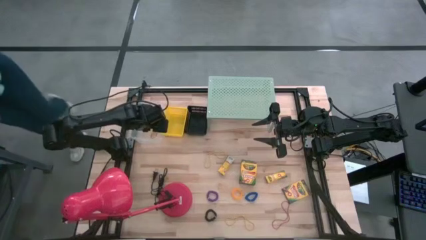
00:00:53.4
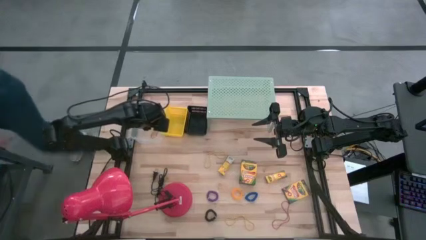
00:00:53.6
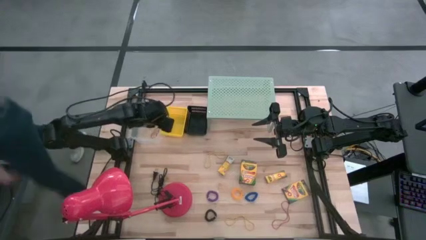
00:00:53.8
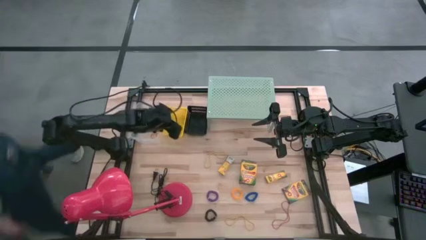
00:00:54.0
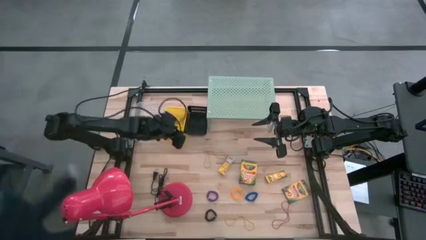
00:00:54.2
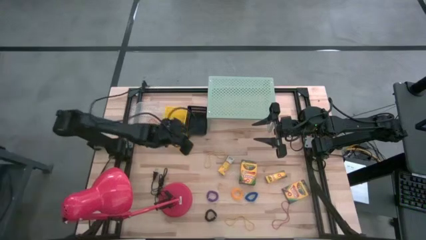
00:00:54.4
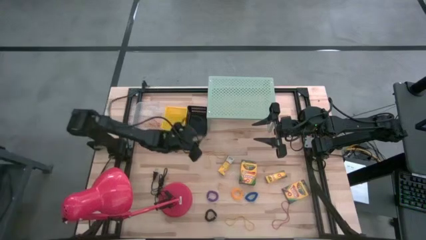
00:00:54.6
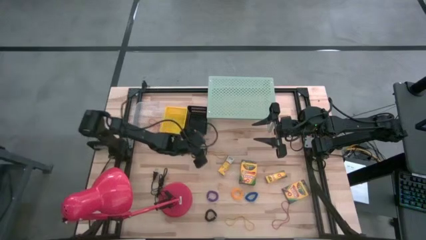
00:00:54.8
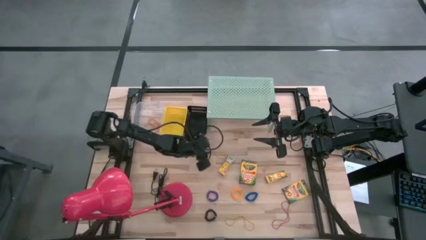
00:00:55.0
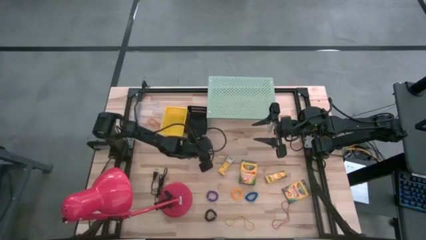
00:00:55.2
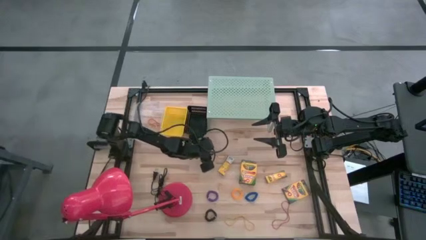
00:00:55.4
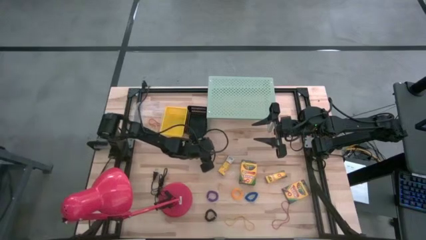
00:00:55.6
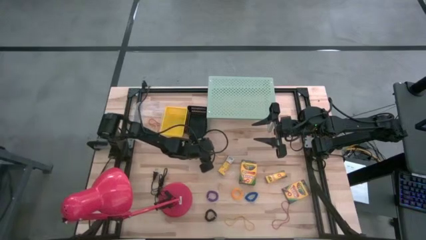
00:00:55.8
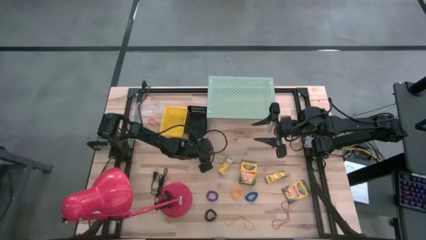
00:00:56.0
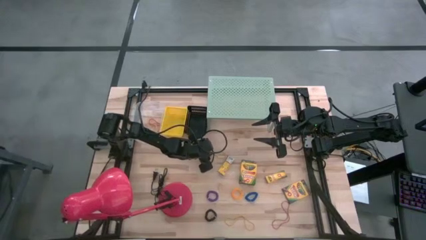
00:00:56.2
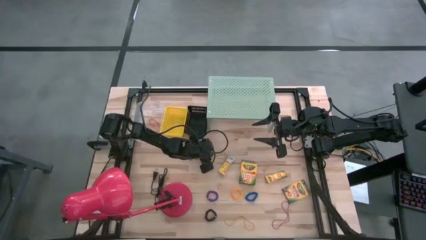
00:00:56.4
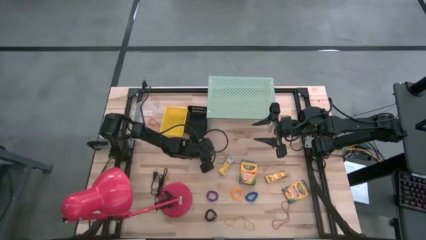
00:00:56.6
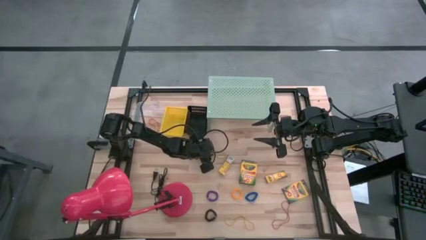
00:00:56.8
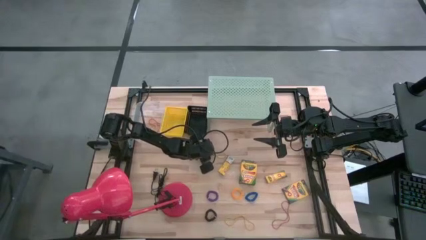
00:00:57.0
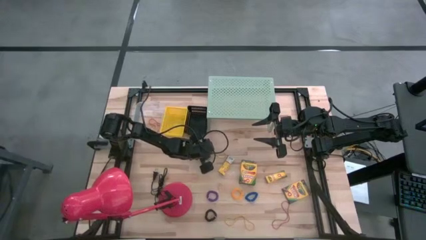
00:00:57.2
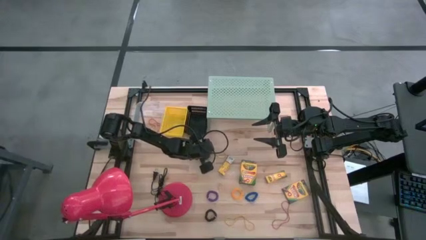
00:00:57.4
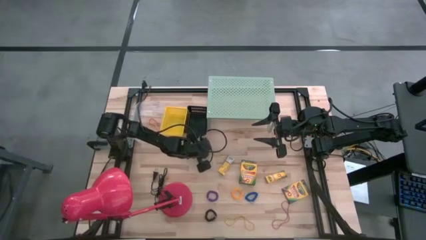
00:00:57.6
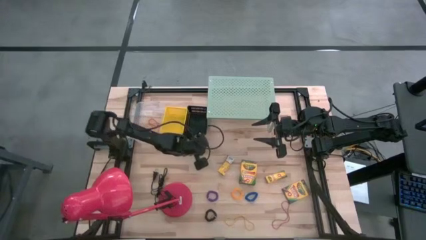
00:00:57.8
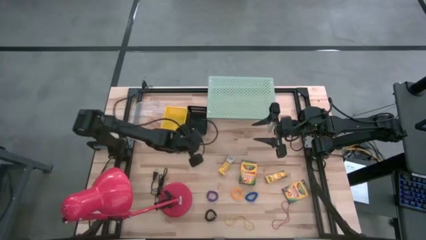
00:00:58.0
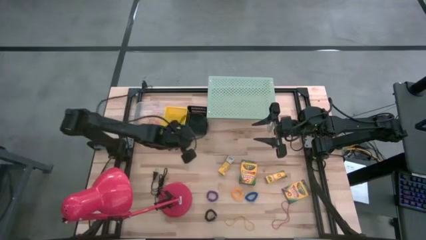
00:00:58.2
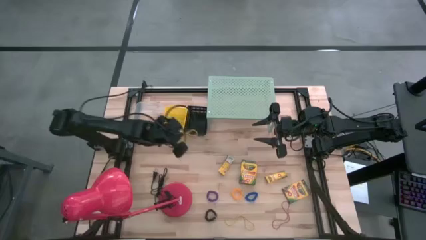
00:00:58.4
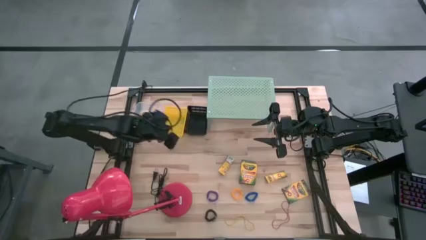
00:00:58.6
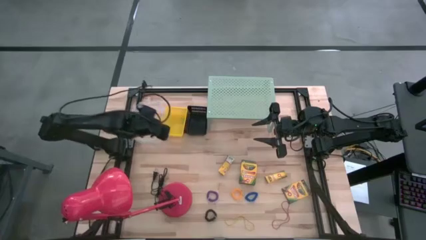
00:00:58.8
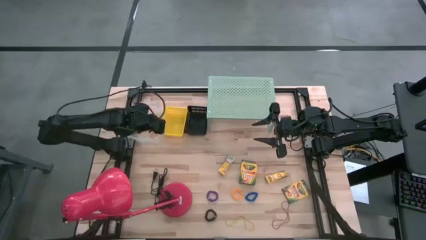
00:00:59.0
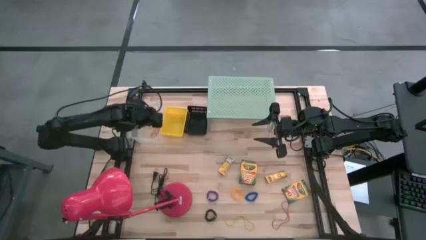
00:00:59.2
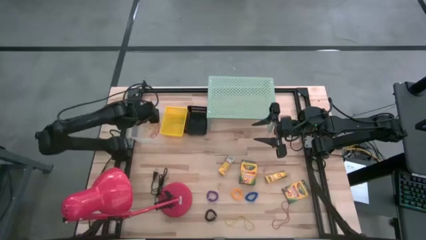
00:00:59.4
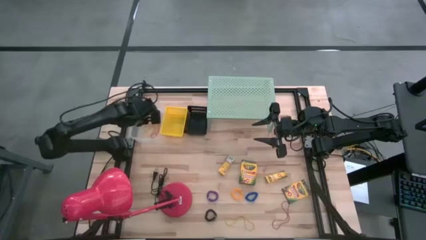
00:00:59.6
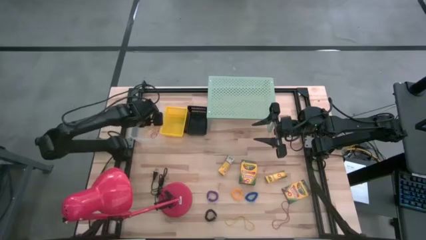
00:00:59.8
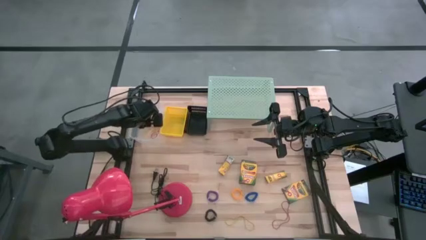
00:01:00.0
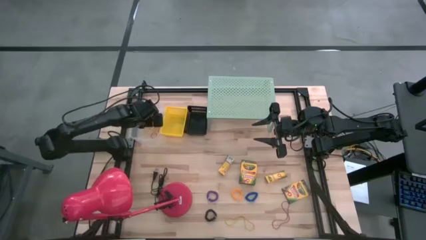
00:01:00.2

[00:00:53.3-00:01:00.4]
Task: Pick & Place Office Desk Supplies
Put the yellow rubber band into the transparent bin
